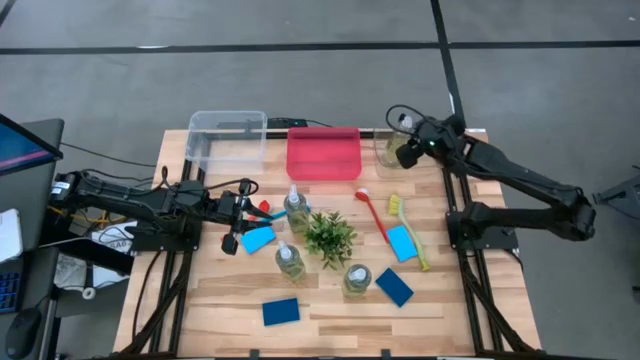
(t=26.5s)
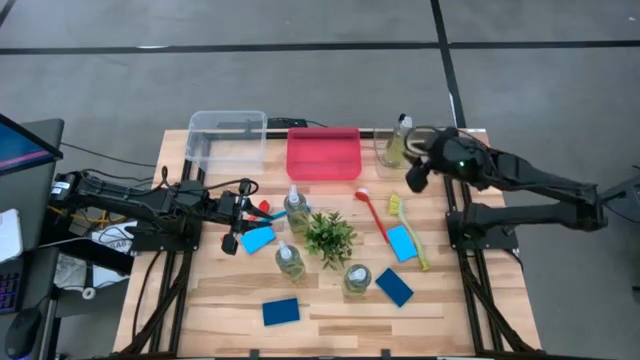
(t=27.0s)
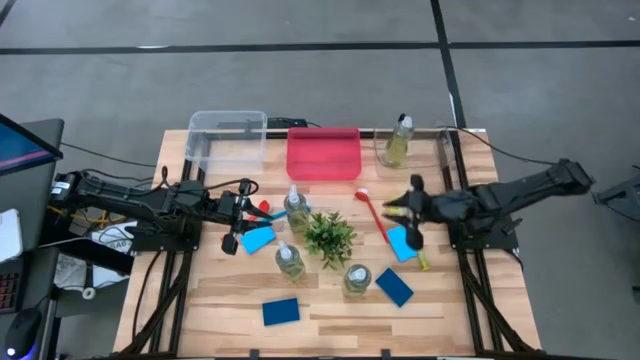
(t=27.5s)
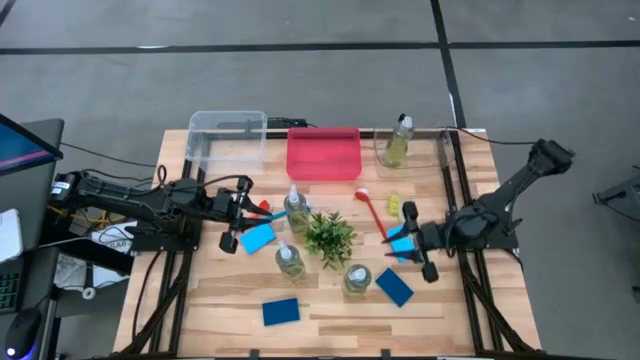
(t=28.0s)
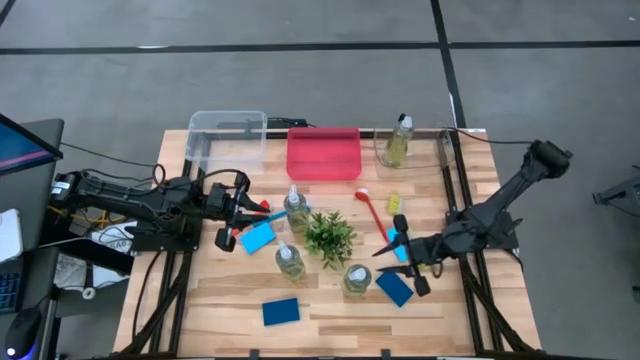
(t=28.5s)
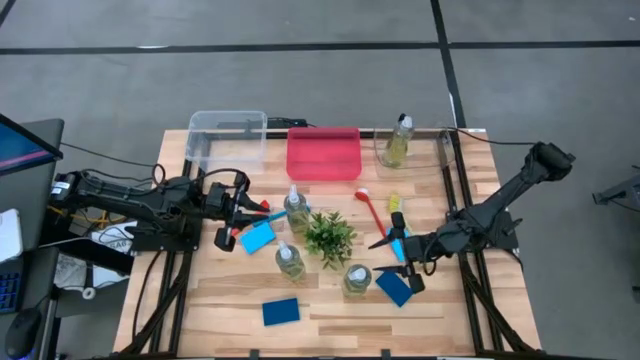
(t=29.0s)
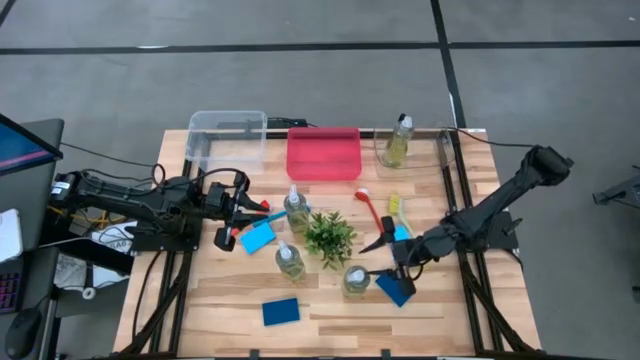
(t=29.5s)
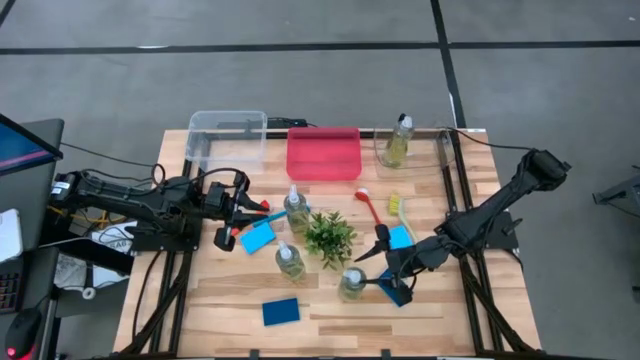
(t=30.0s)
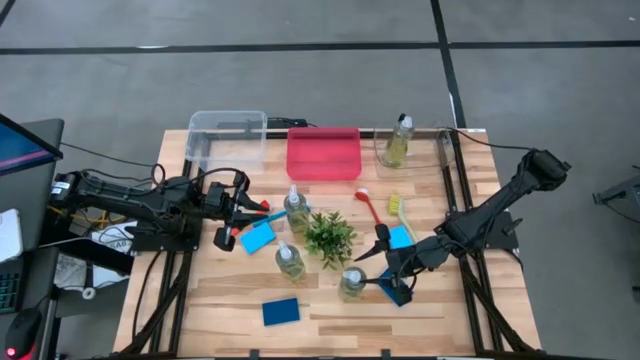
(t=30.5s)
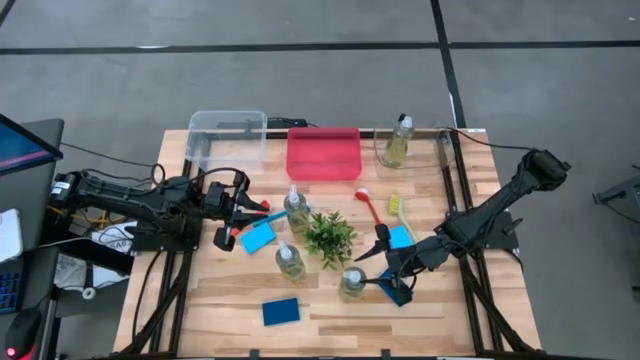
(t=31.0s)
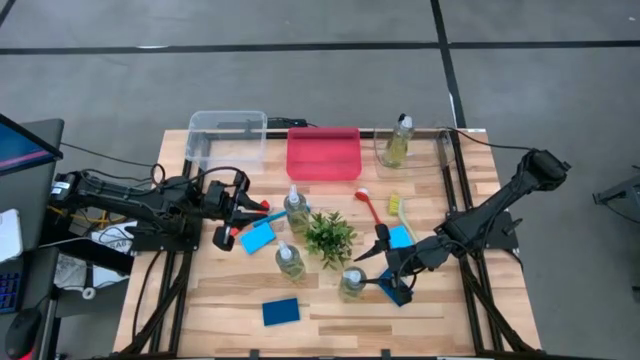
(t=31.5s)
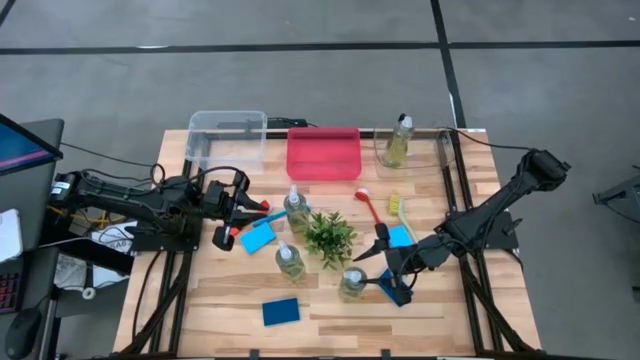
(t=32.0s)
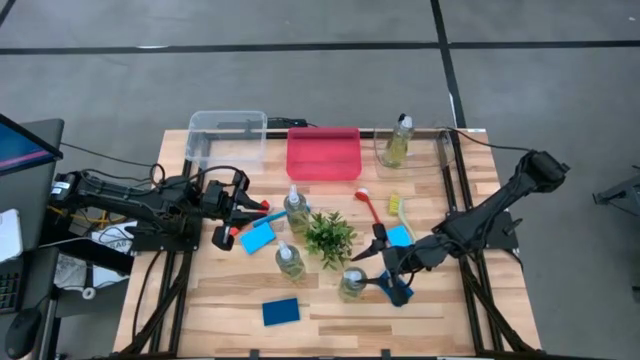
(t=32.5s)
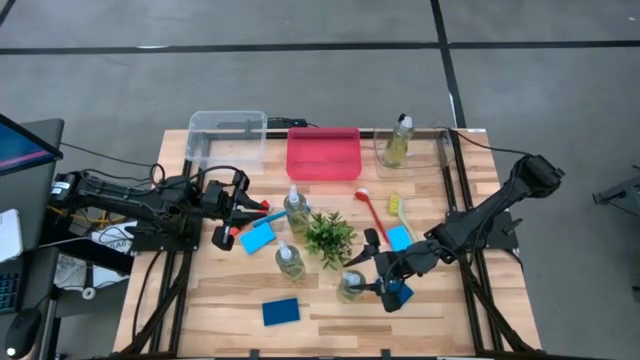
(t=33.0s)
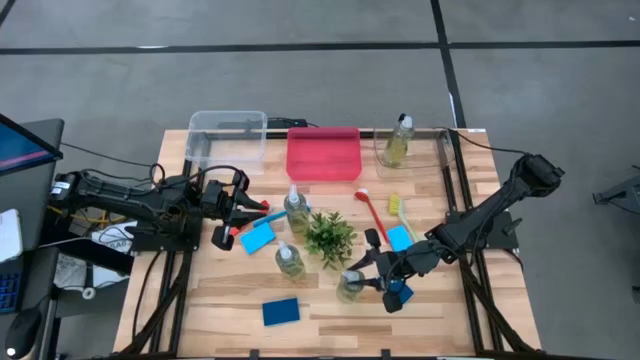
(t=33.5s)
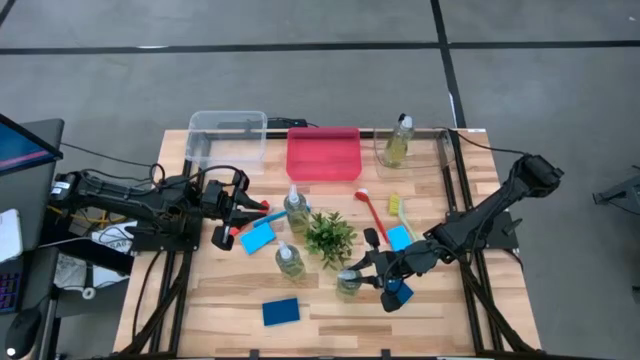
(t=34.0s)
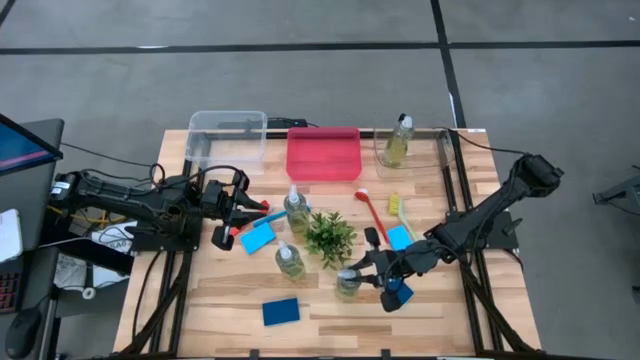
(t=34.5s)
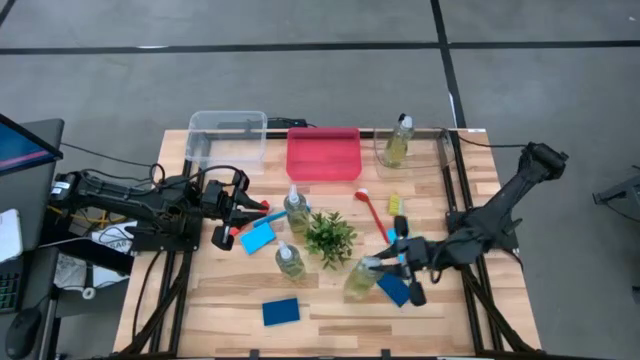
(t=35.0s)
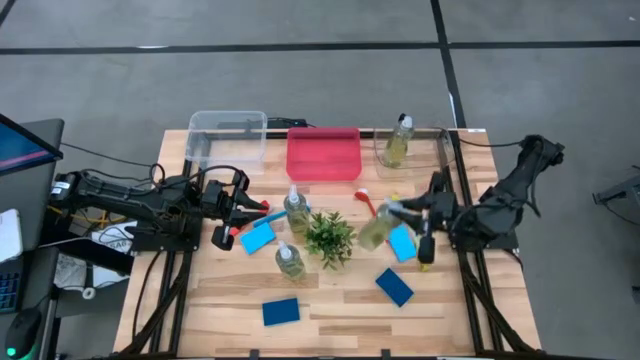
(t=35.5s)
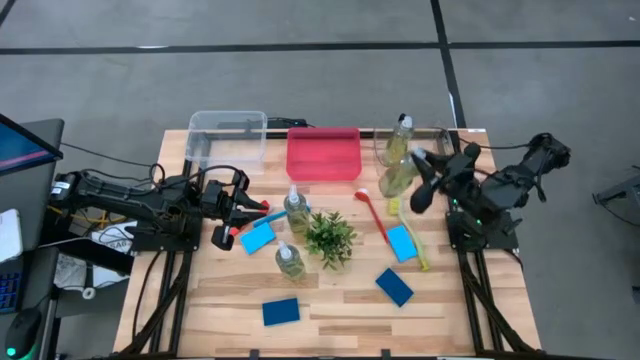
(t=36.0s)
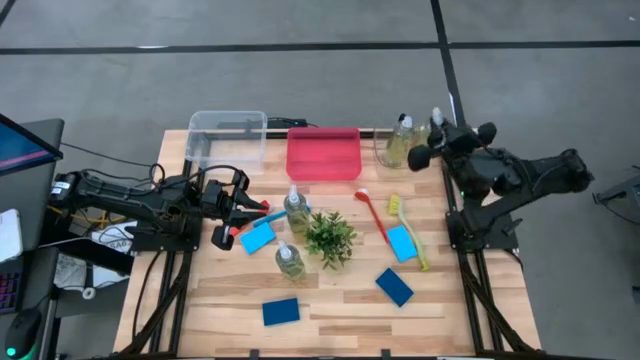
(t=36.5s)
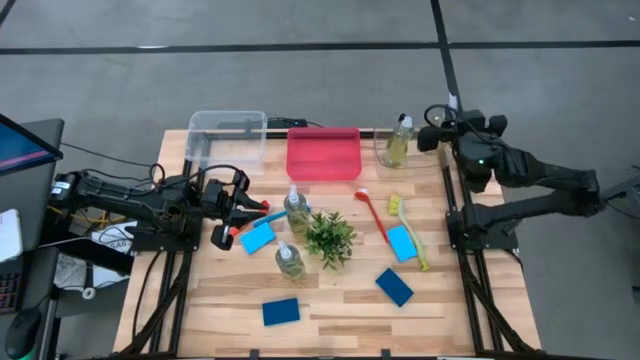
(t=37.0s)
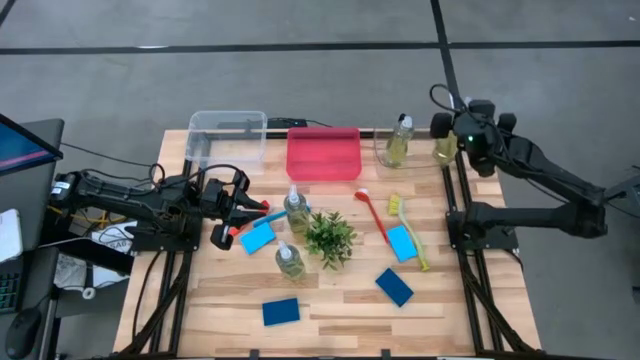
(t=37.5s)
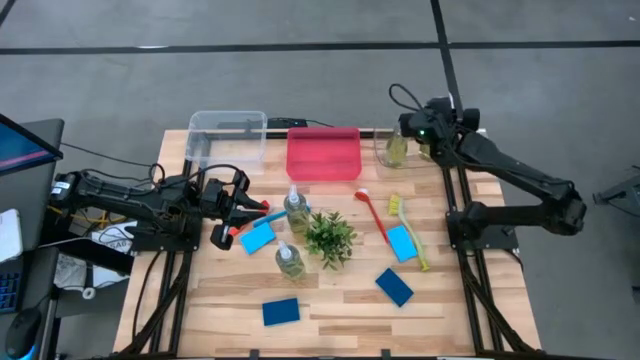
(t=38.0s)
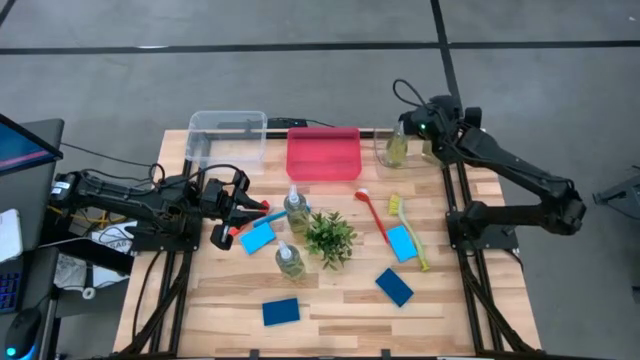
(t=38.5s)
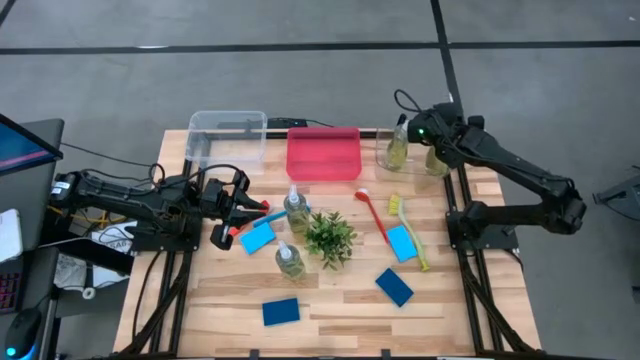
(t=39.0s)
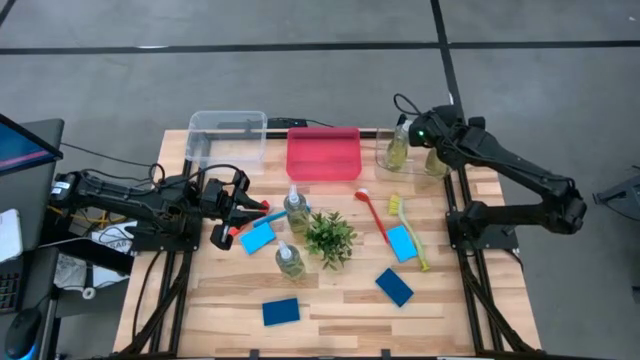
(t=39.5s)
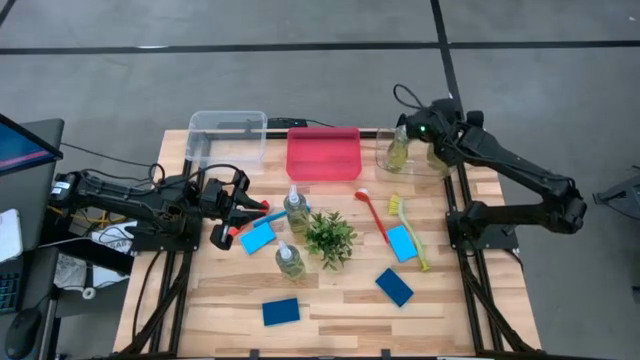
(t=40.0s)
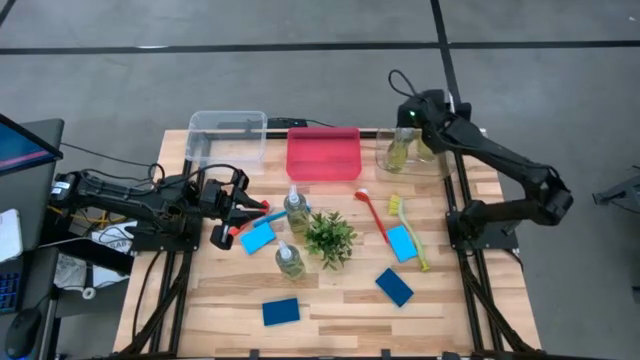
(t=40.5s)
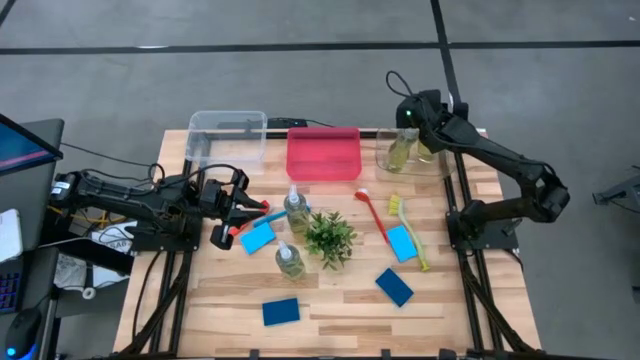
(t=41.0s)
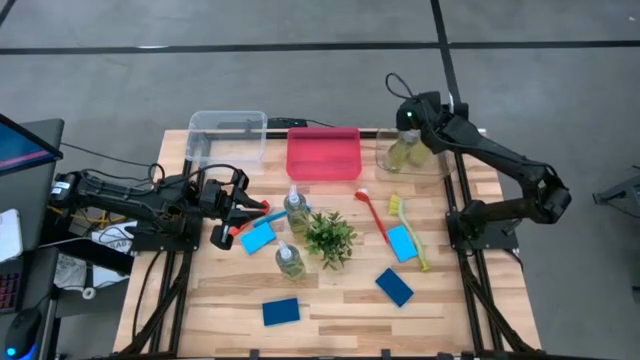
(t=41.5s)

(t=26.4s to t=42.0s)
Task: Pick & Place Kitchen Sink Supplies
Put the green dishwashing liquid dispenser into the right transparent bin

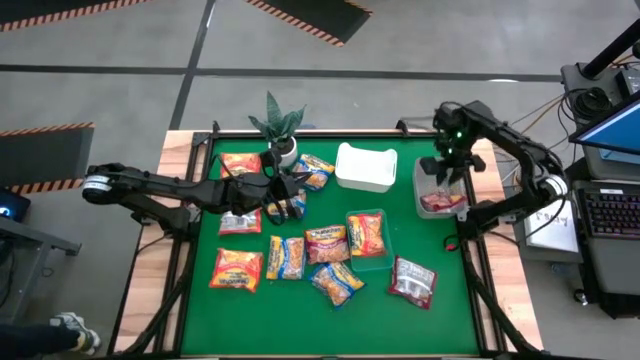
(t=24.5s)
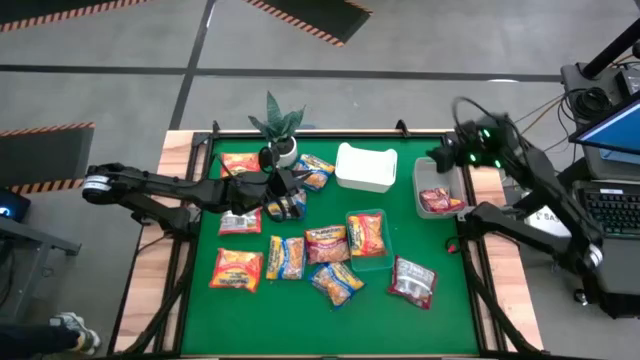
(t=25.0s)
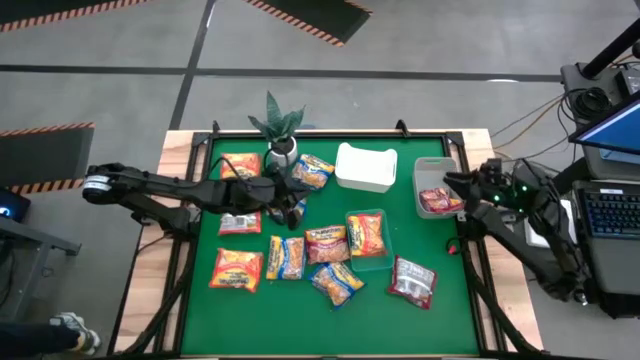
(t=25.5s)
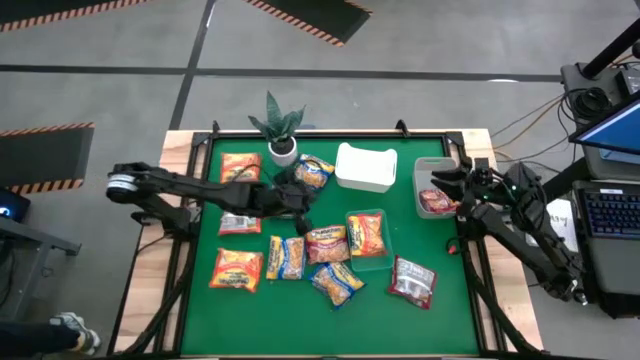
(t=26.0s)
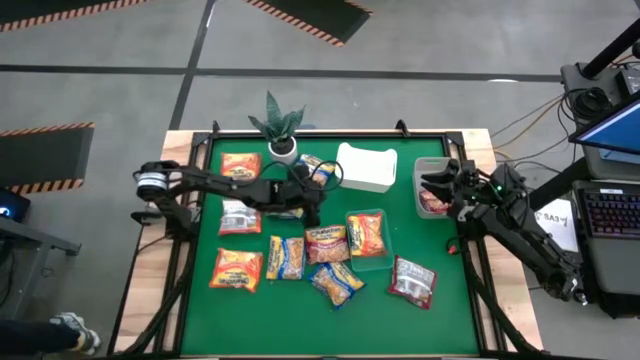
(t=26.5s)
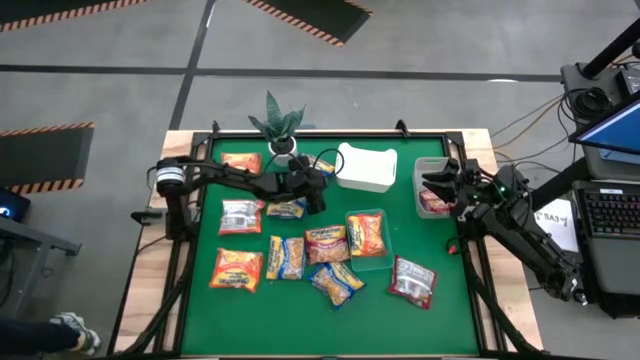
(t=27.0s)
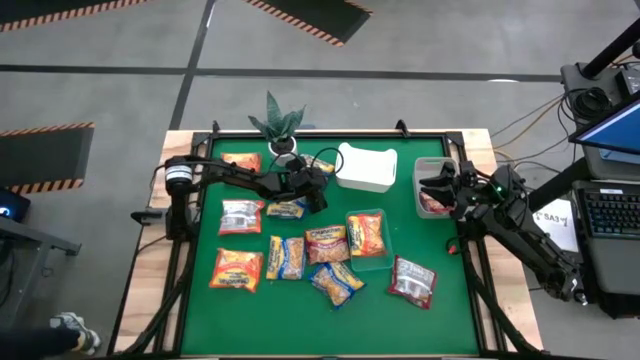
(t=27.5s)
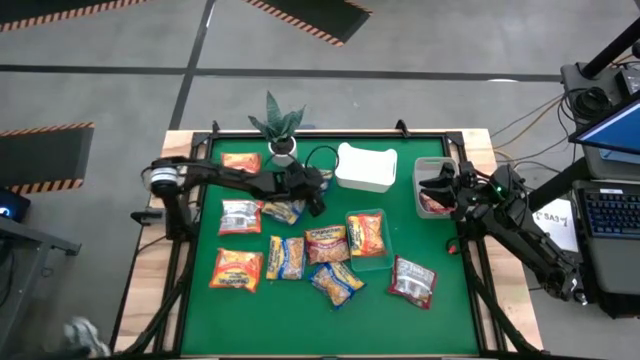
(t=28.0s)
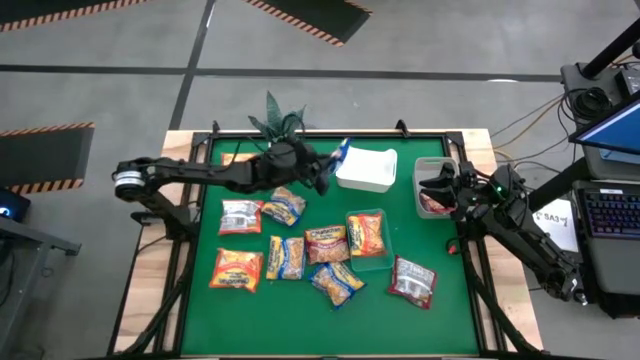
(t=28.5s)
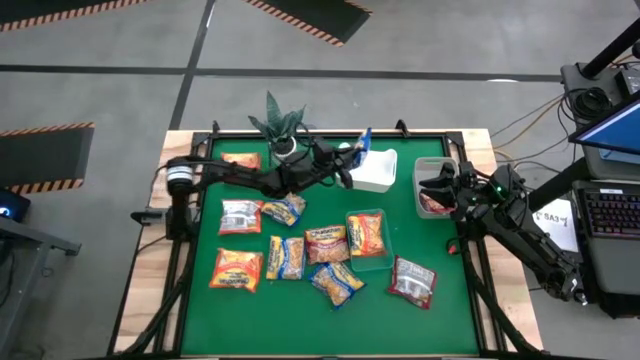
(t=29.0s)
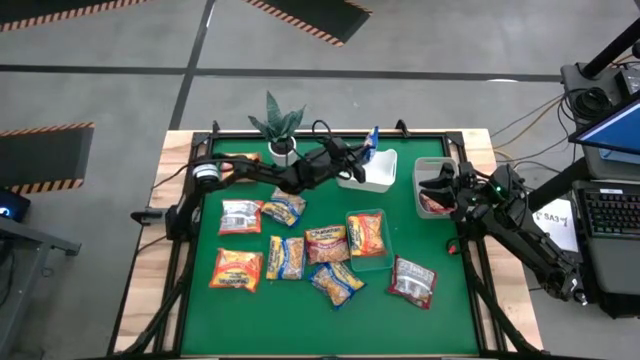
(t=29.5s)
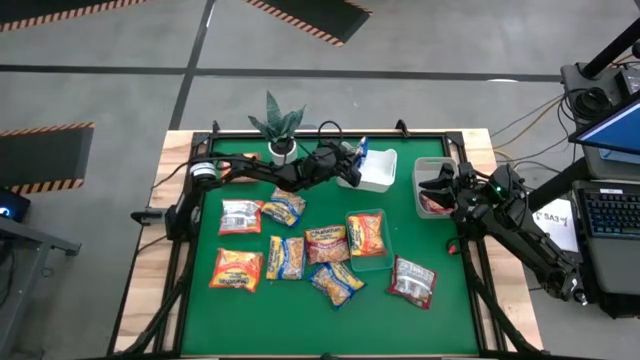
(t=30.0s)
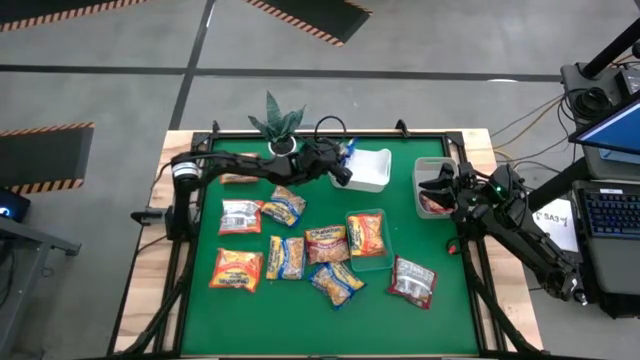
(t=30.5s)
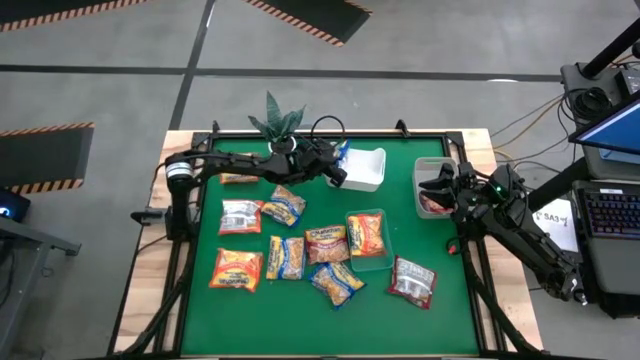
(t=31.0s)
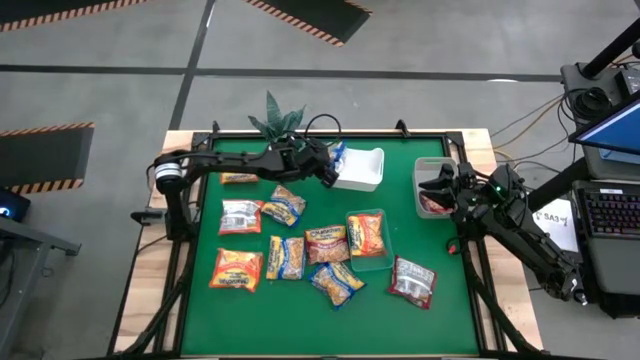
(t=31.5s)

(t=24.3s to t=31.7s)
Task: Sort Maruchan noodles
Put the blue noodle pack into the white bin
